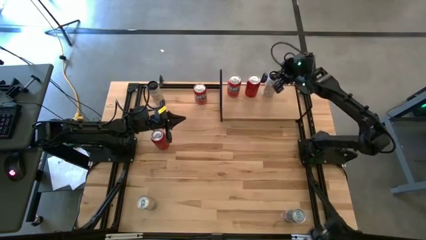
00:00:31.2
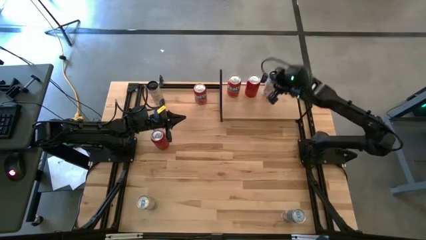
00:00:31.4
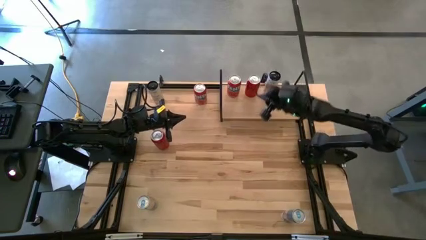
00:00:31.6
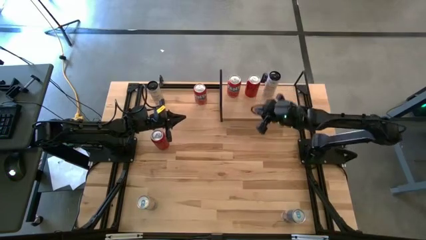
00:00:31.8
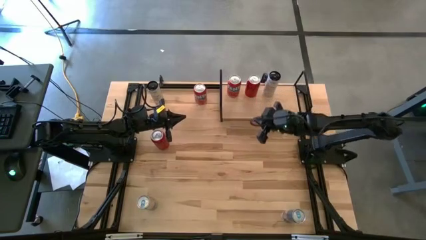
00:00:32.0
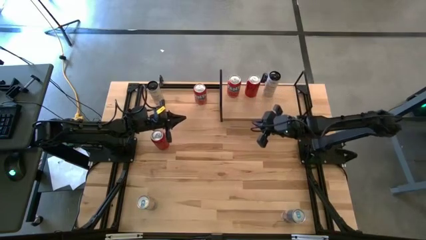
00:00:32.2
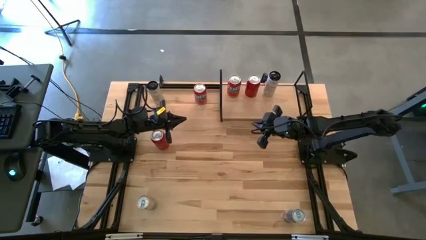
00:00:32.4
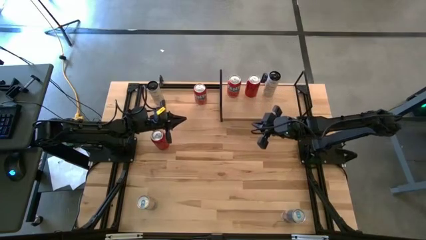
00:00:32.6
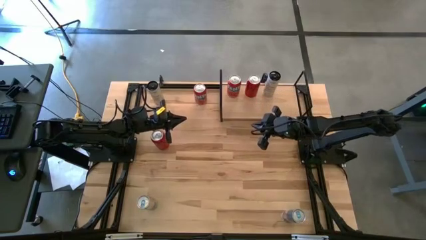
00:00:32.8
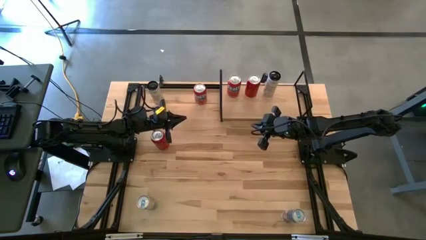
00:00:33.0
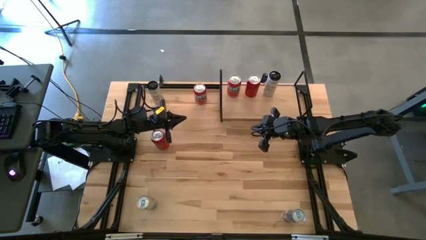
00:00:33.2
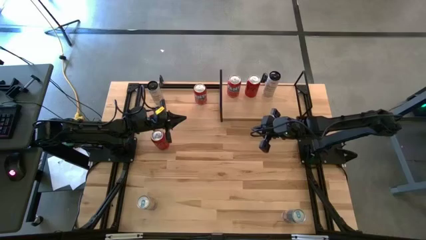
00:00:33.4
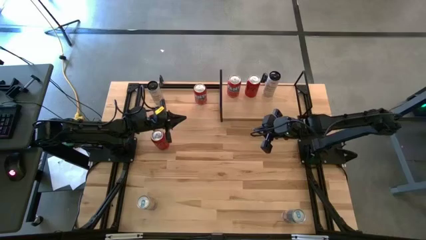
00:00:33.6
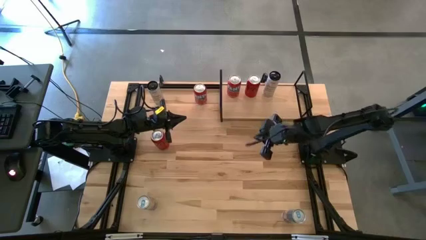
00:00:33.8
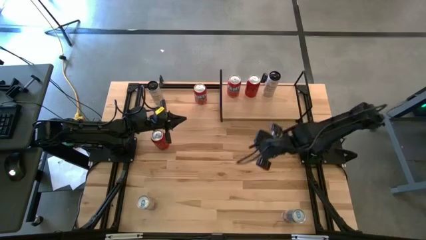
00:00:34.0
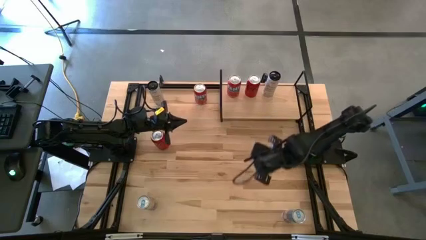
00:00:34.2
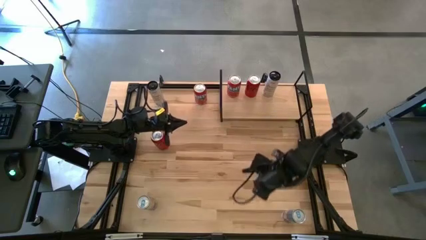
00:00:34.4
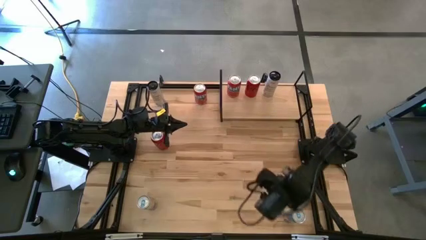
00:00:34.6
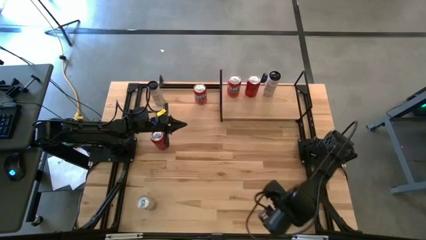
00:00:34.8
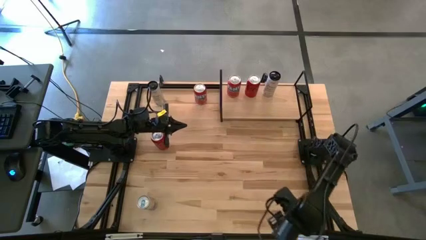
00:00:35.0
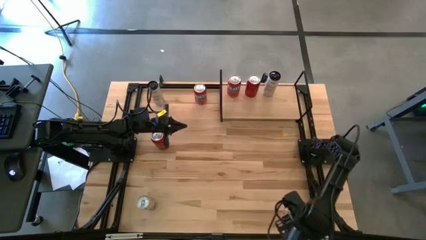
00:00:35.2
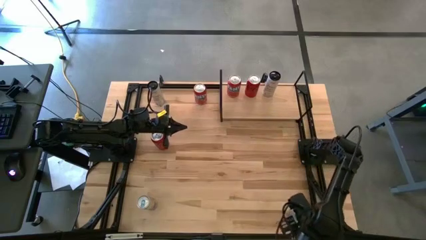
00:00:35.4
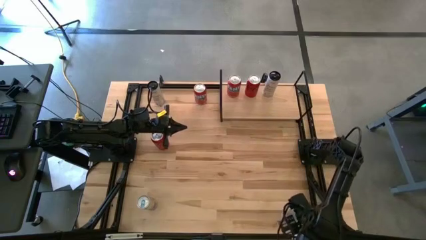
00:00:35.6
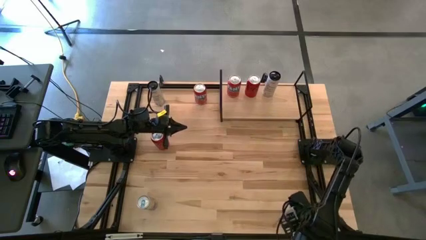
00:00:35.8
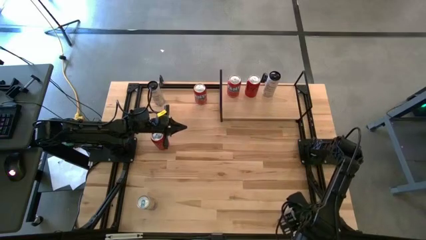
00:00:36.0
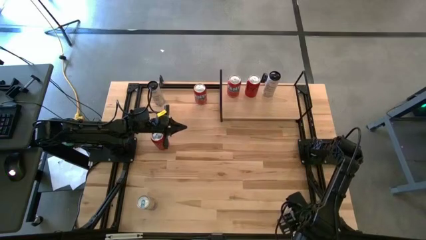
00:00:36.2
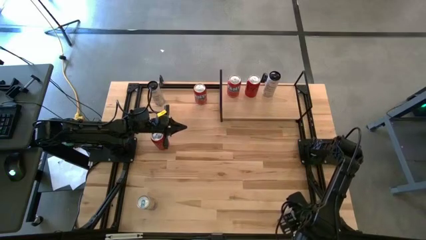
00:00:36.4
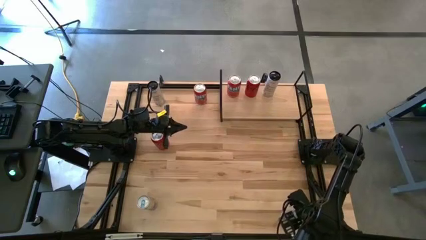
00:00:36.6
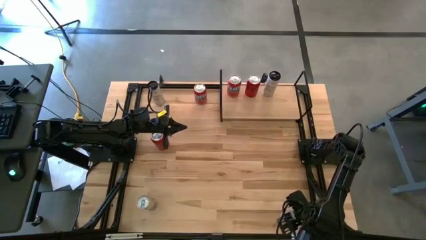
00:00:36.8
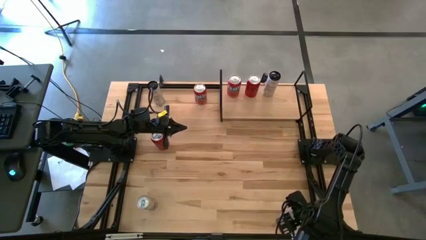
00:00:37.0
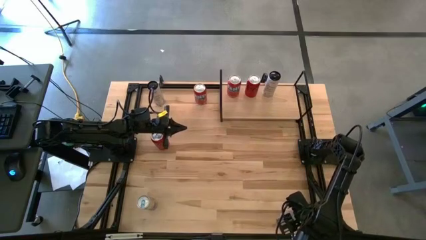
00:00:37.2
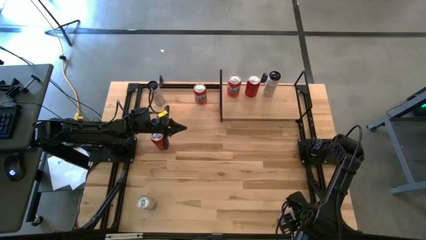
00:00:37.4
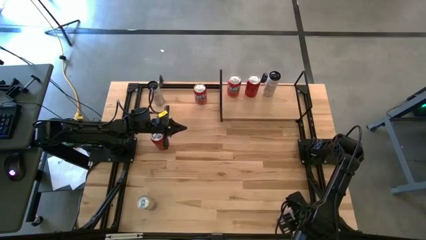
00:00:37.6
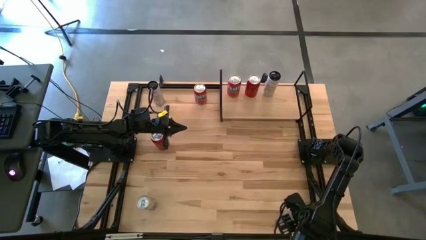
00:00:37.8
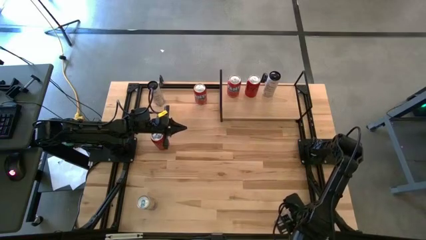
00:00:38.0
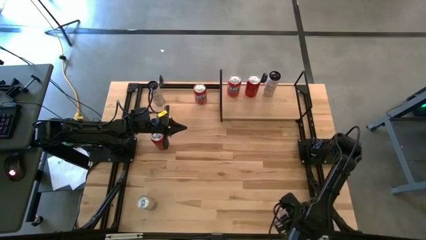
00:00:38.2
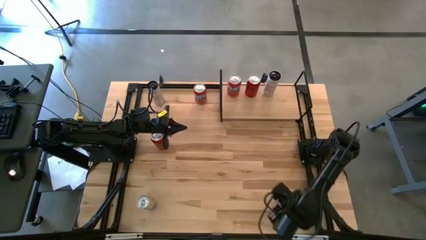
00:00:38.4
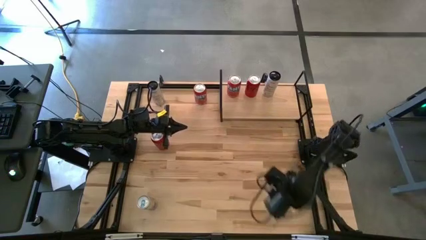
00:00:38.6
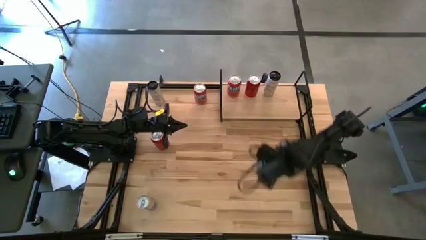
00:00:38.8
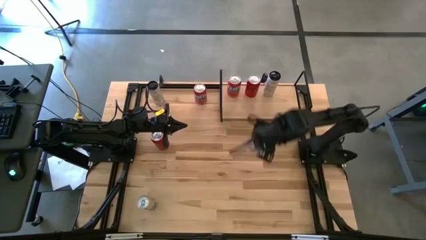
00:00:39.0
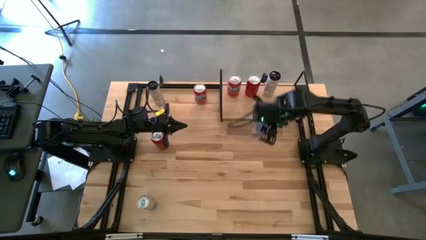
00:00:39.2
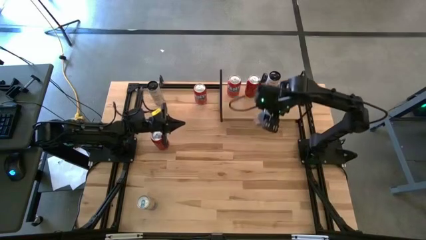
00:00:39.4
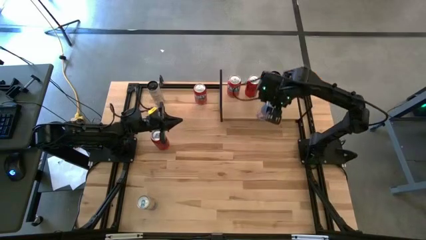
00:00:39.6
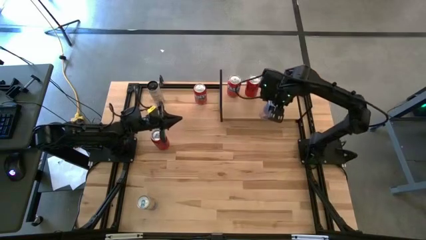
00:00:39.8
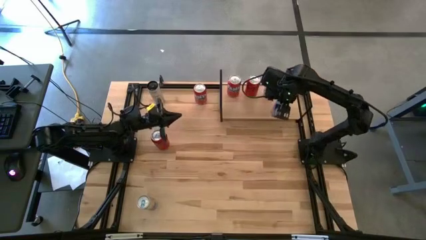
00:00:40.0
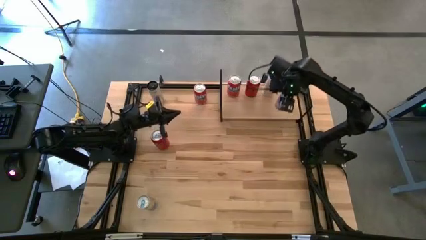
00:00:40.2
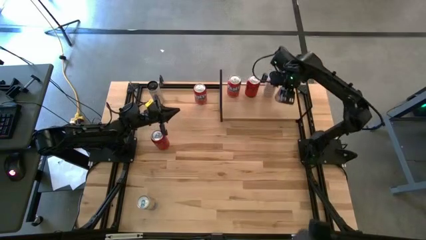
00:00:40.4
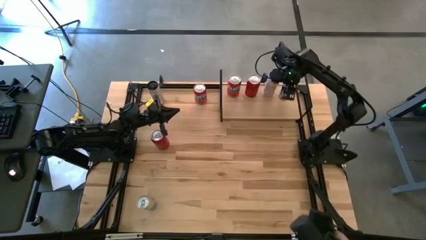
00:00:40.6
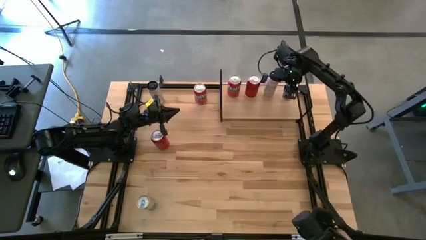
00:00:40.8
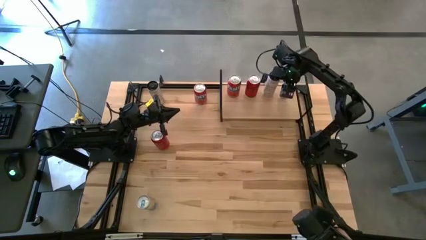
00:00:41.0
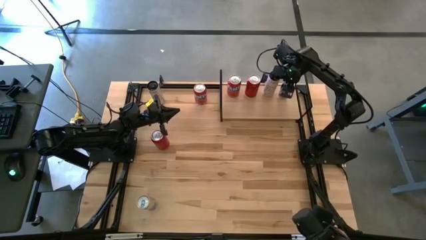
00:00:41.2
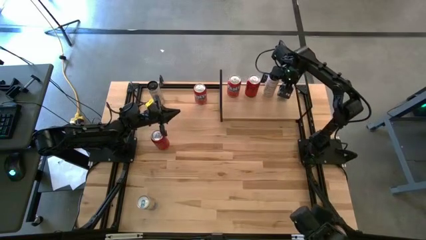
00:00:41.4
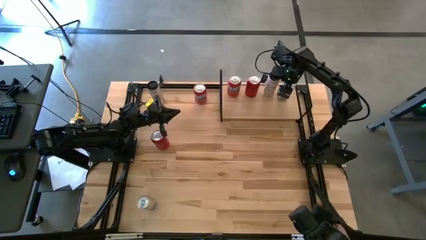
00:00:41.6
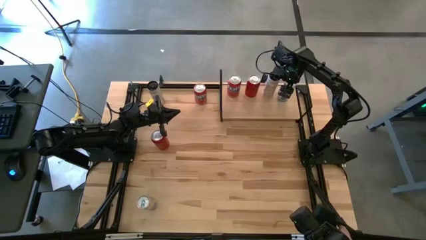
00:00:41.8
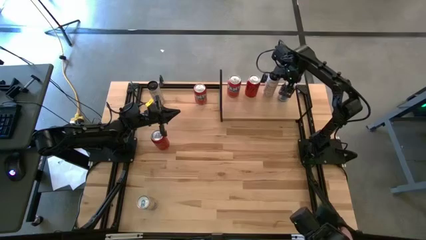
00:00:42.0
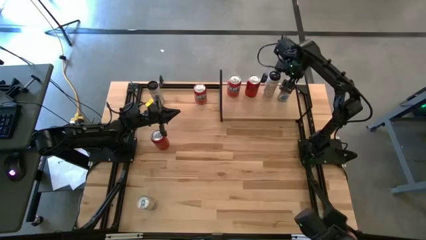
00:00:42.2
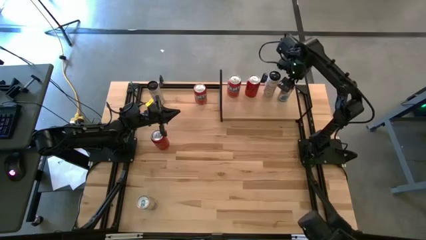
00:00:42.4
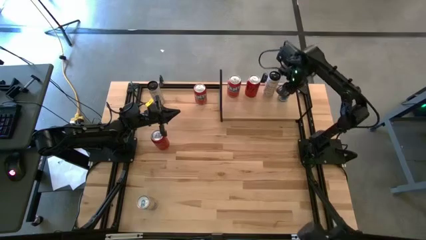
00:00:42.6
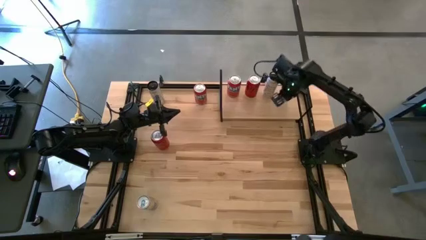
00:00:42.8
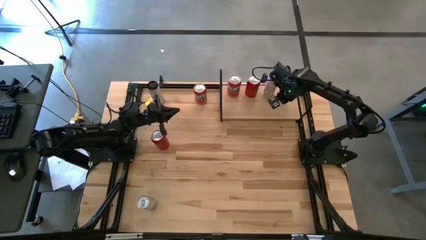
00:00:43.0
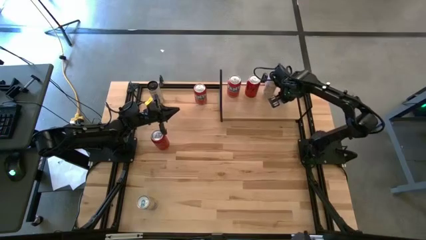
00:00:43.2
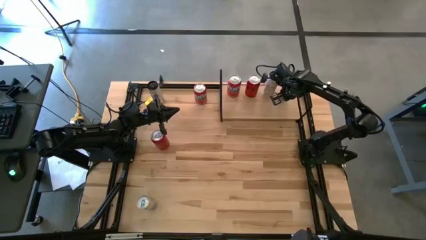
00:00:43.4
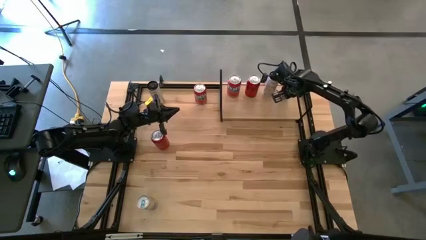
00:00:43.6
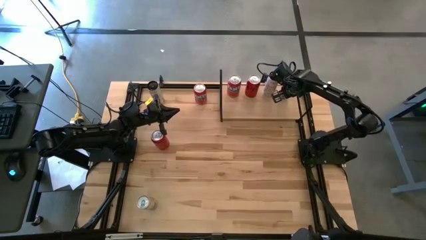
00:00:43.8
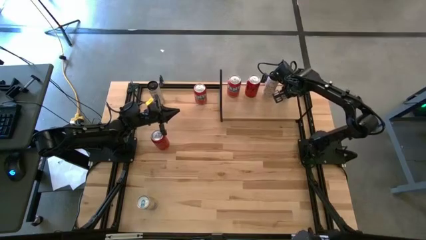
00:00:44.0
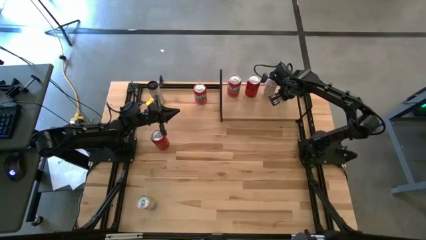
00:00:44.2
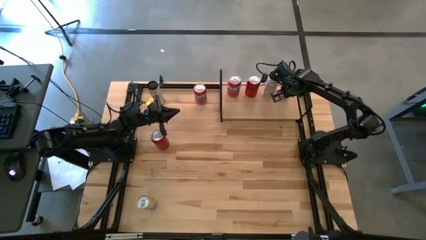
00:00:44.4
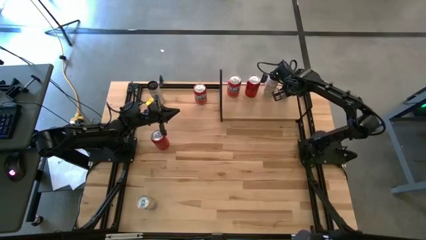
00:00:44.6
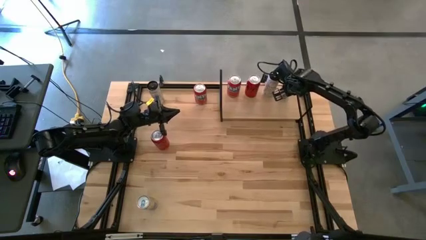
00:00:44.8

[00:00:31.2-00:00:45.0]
Task: Place canned beverage on shelf
Put the right blue soda can on the shelf

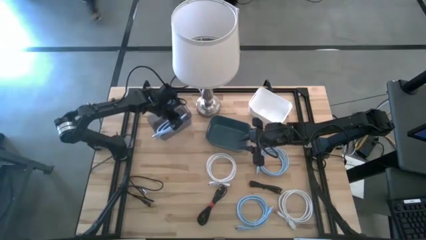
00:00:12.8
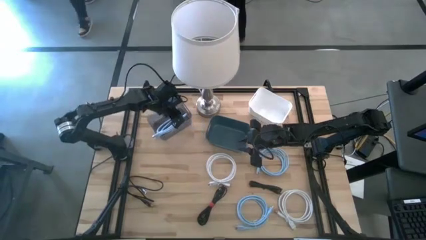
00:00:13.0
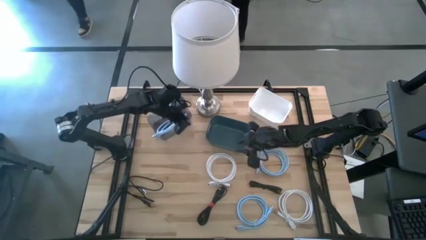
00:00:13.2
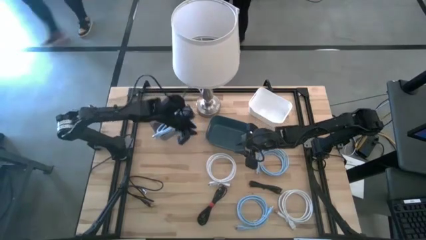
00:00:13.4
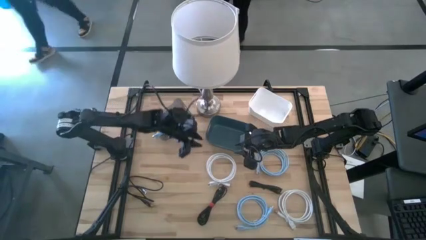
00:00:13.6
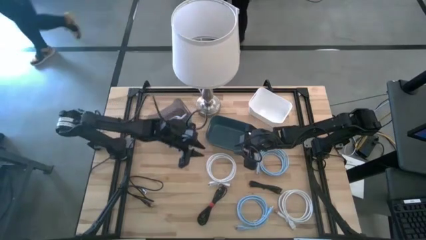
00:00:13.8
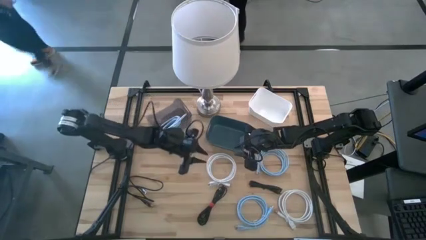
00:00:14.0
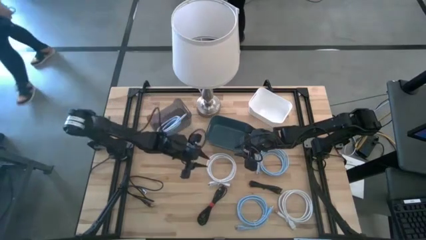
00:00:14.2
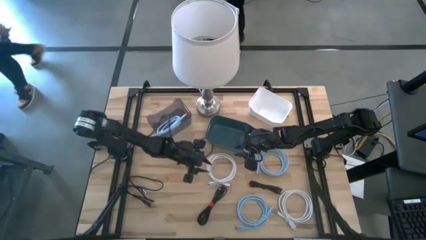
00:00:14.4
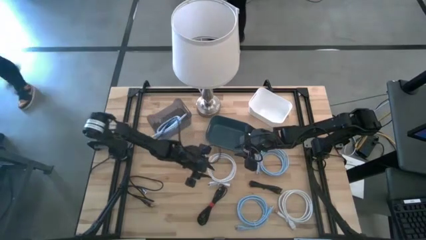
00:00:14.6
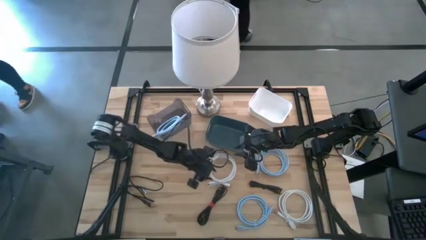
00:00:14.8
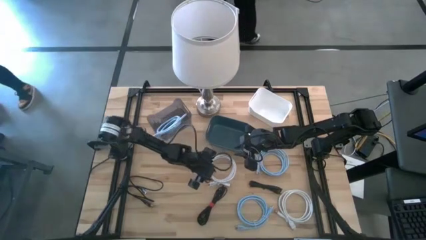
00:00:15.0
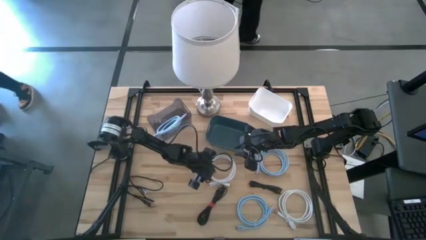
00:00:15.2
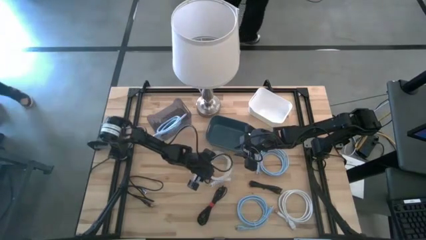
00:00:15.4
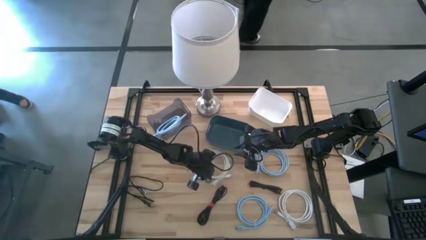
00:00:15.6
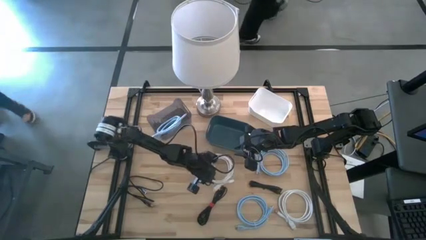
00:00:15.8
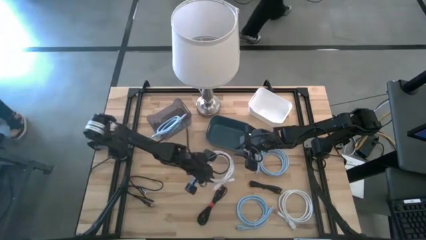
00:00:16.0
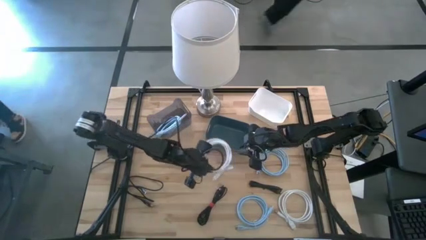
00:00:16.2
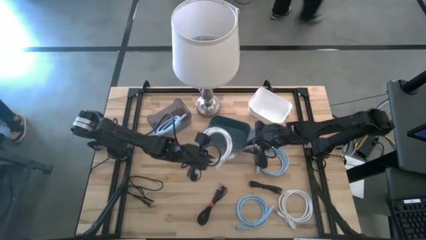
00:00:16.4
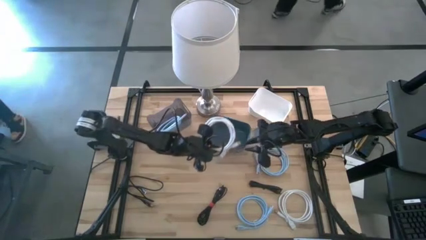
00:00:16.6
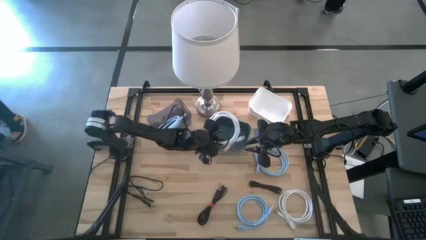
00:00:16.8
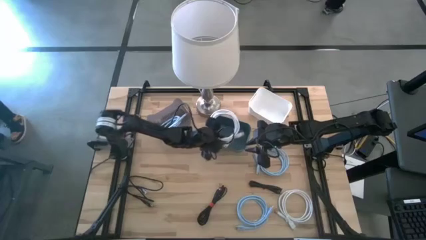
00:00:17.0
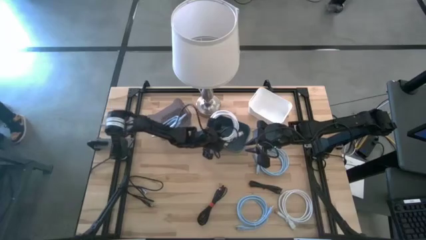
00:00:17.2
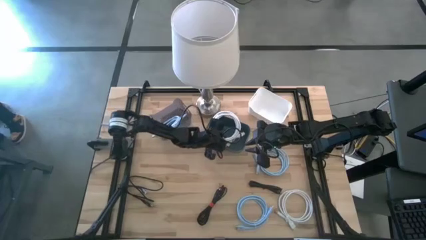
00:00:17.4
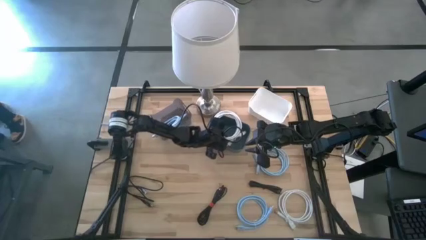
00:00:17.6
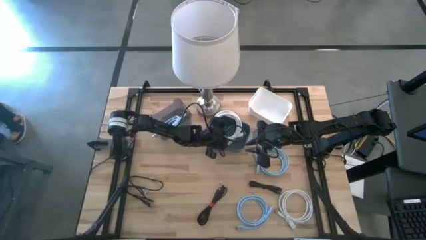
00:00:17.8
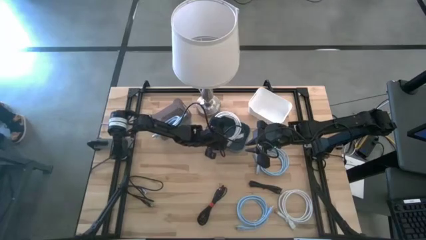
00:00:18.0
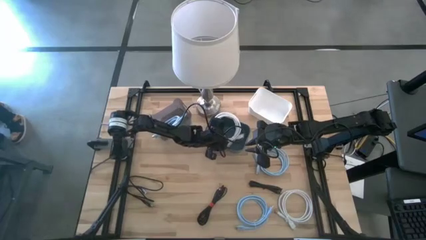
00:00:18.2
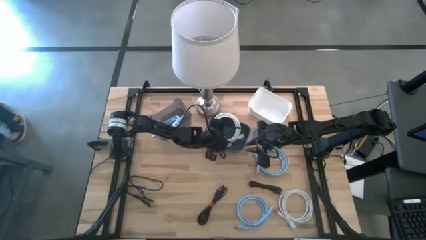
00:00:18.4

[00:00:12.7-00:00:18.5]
Task: Pick & Place USB Port
Put the left white hdmi cable into the blue bin
